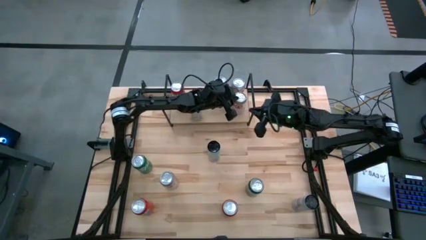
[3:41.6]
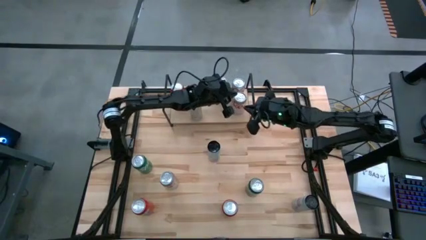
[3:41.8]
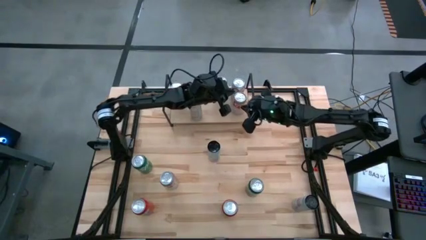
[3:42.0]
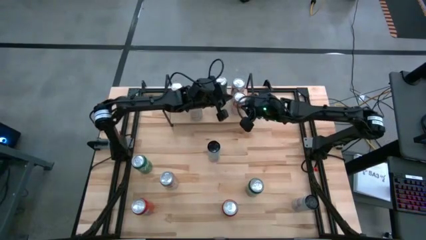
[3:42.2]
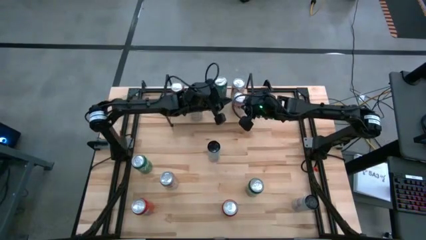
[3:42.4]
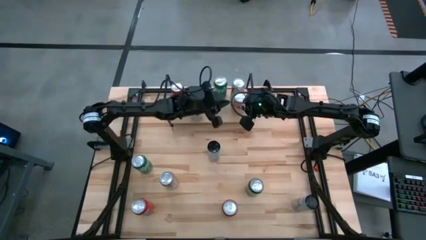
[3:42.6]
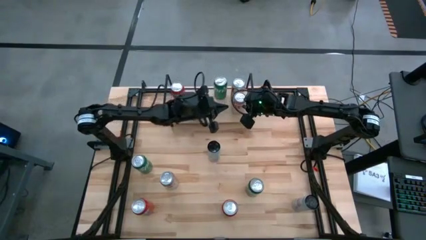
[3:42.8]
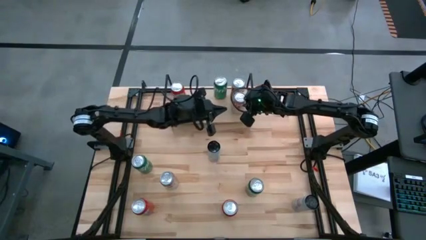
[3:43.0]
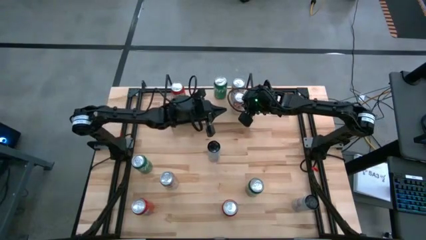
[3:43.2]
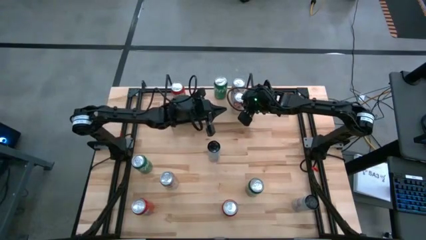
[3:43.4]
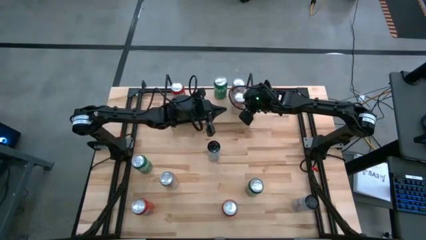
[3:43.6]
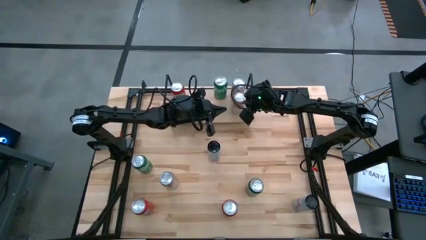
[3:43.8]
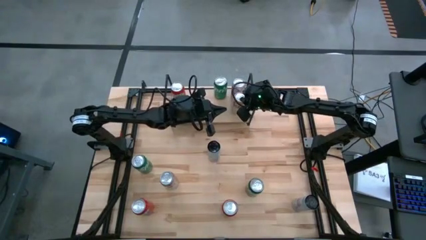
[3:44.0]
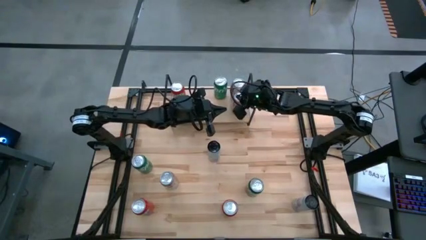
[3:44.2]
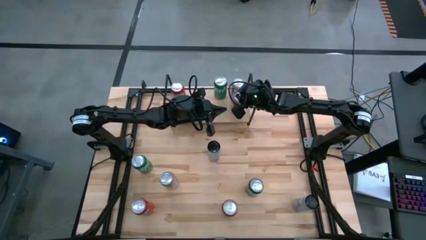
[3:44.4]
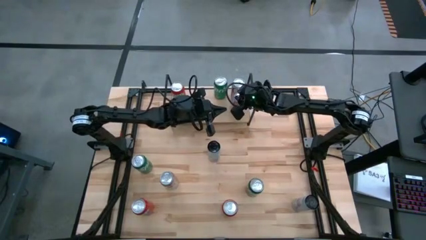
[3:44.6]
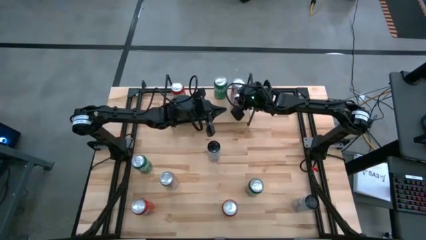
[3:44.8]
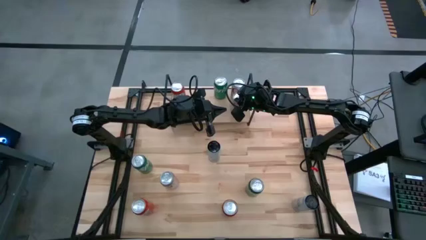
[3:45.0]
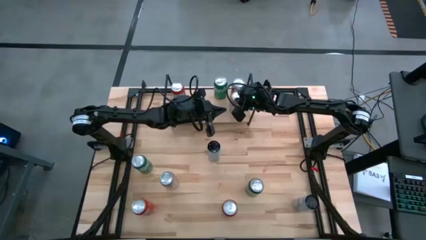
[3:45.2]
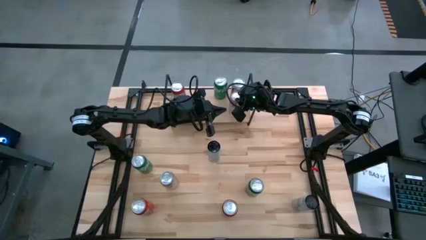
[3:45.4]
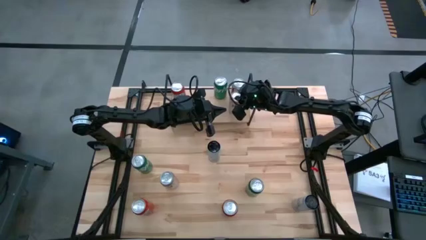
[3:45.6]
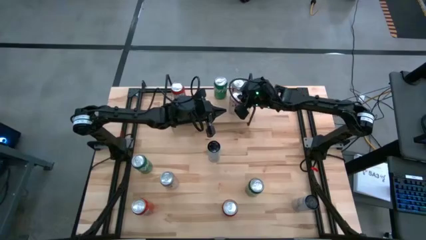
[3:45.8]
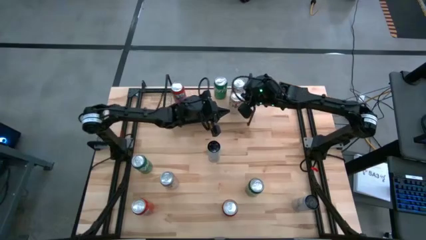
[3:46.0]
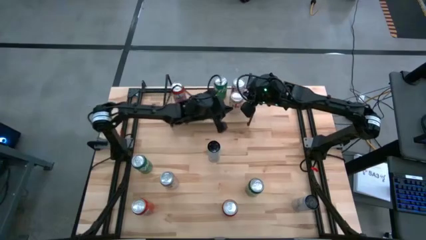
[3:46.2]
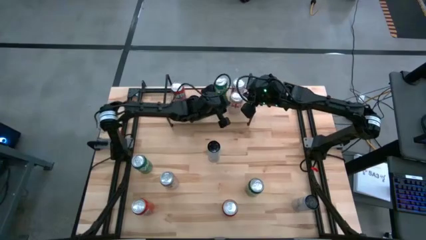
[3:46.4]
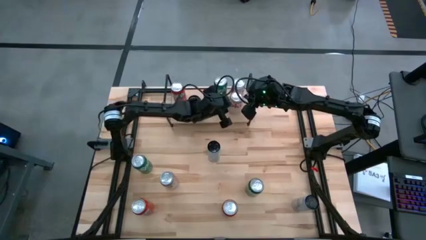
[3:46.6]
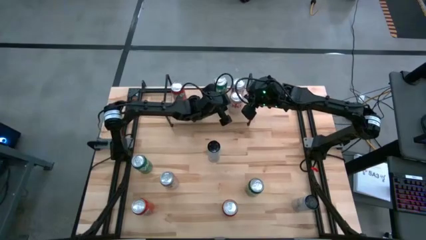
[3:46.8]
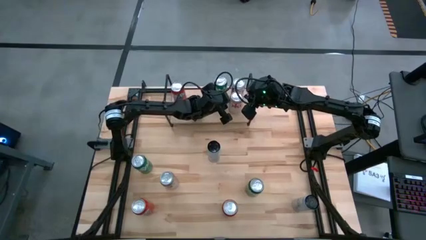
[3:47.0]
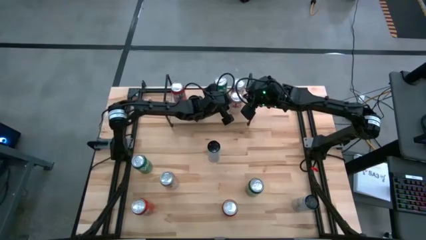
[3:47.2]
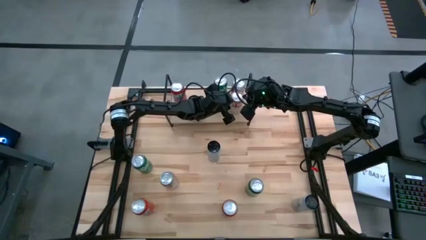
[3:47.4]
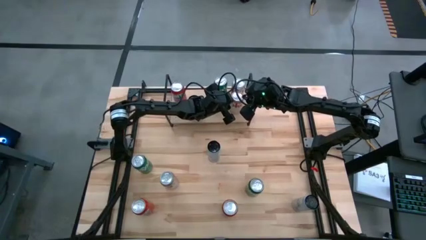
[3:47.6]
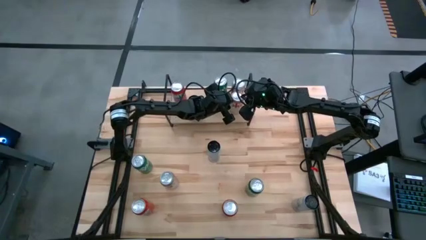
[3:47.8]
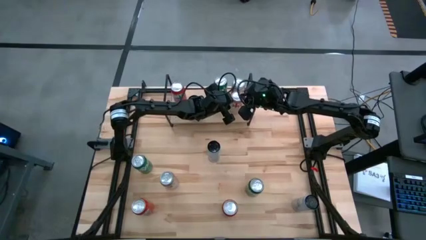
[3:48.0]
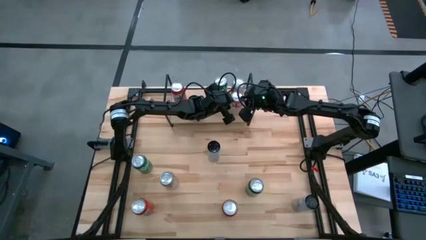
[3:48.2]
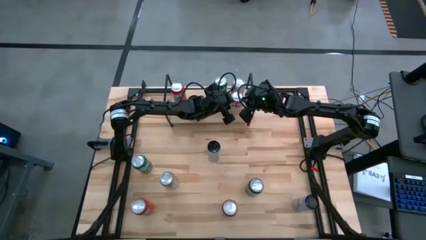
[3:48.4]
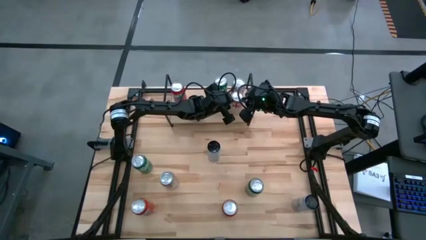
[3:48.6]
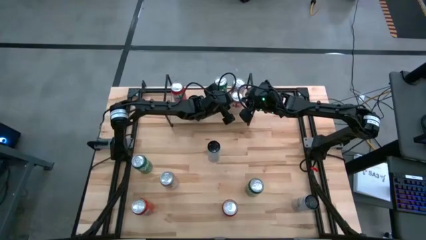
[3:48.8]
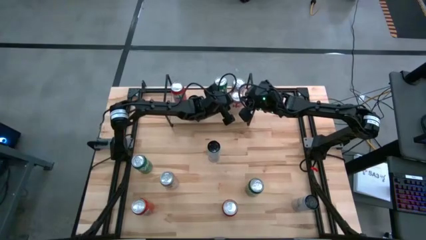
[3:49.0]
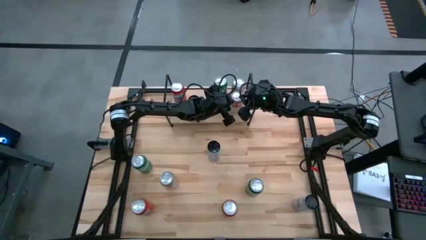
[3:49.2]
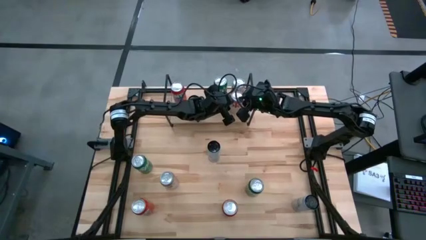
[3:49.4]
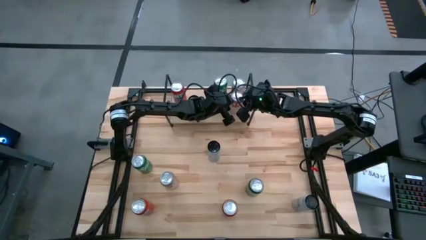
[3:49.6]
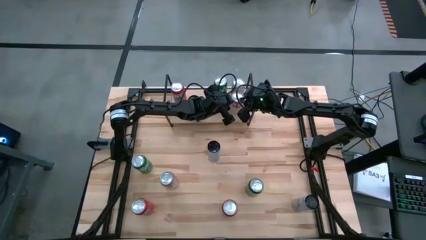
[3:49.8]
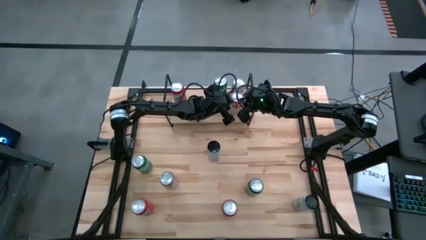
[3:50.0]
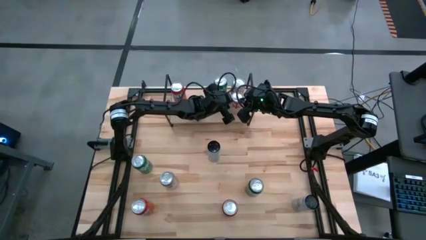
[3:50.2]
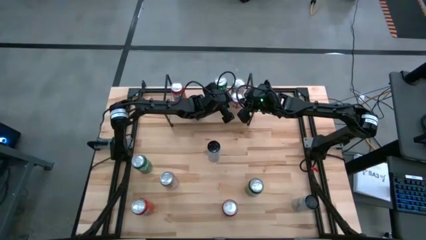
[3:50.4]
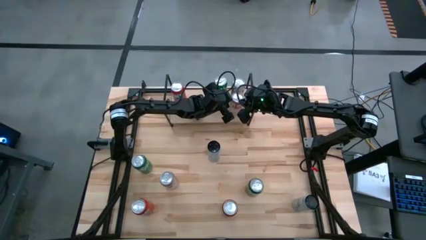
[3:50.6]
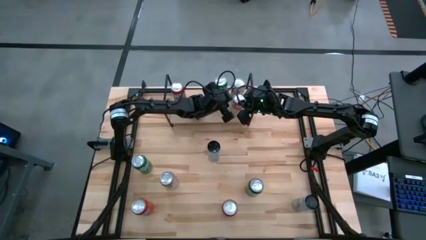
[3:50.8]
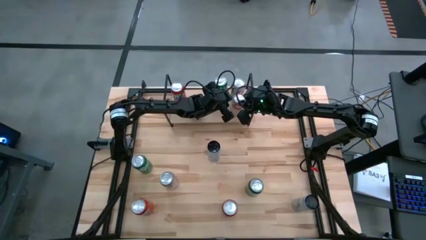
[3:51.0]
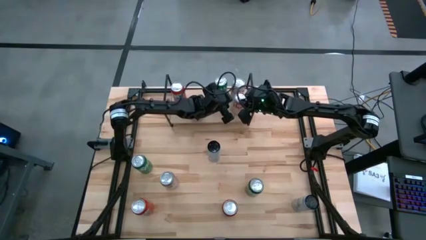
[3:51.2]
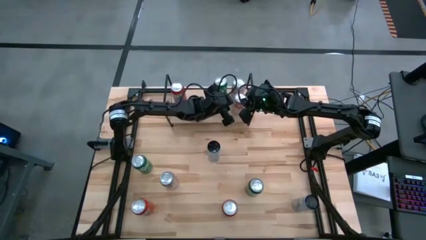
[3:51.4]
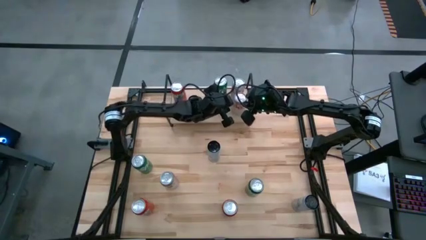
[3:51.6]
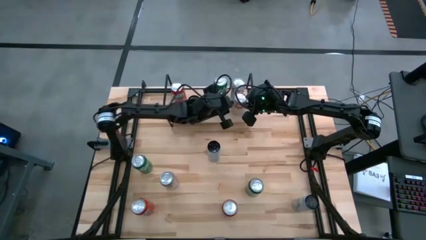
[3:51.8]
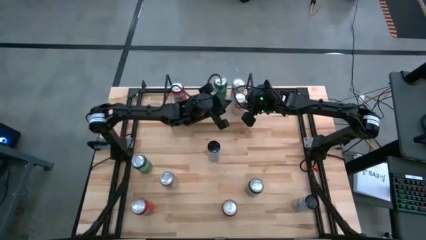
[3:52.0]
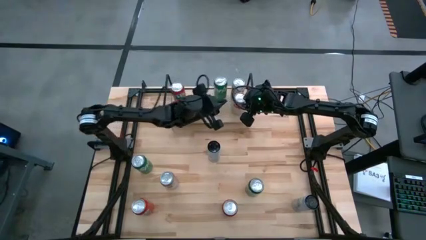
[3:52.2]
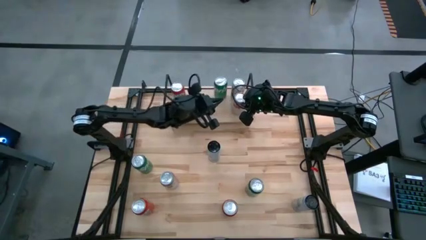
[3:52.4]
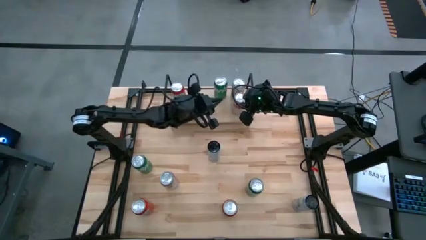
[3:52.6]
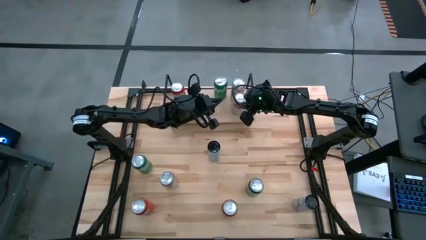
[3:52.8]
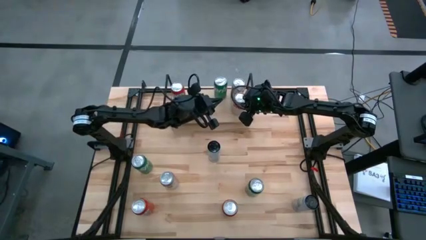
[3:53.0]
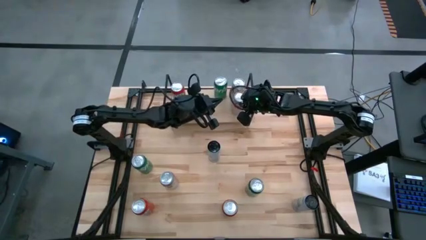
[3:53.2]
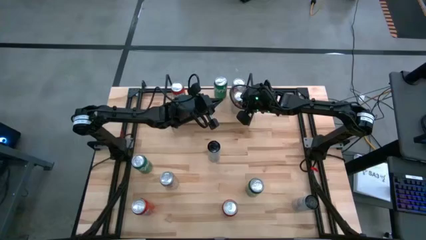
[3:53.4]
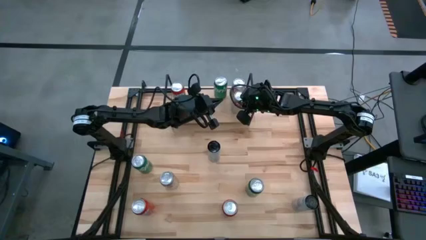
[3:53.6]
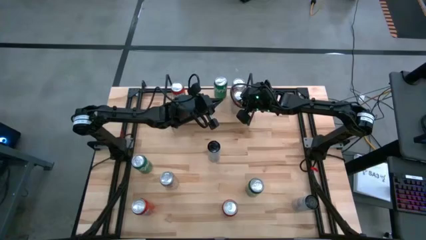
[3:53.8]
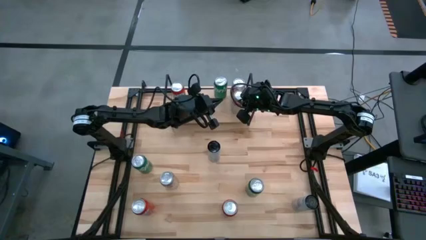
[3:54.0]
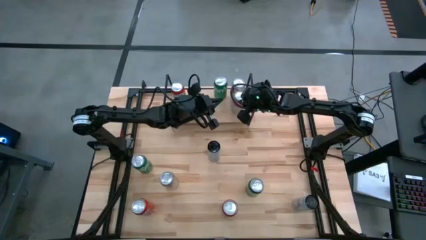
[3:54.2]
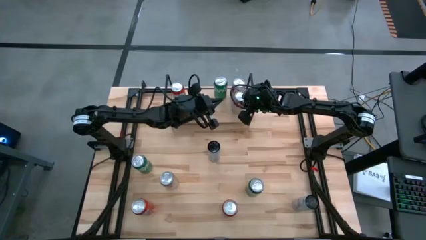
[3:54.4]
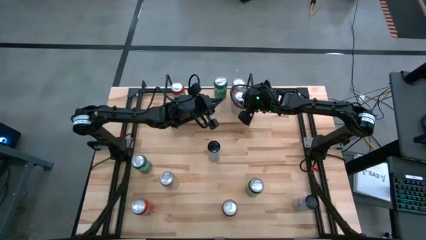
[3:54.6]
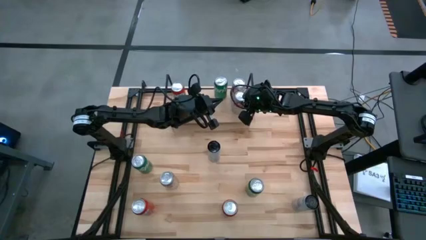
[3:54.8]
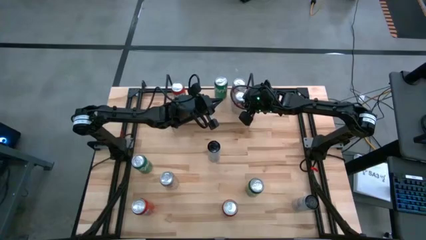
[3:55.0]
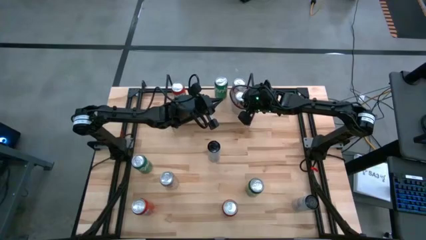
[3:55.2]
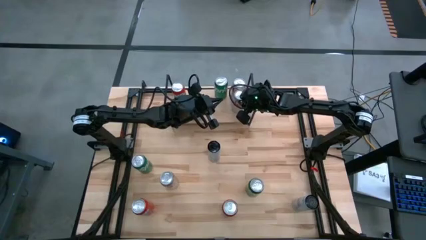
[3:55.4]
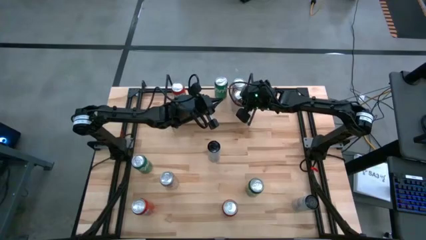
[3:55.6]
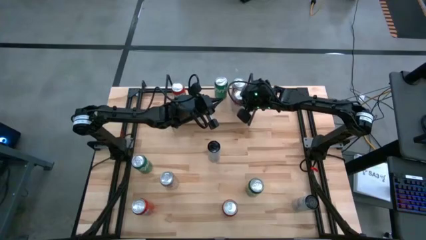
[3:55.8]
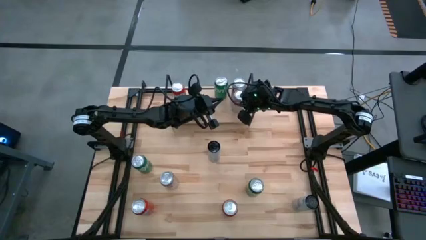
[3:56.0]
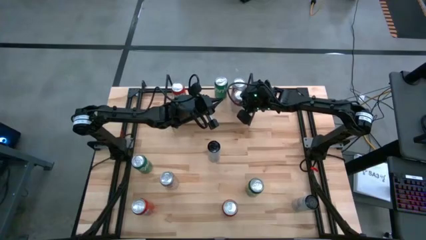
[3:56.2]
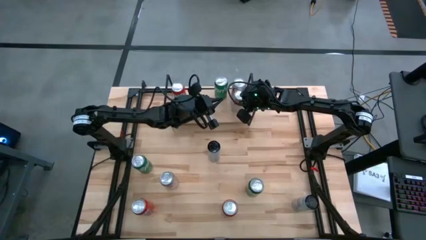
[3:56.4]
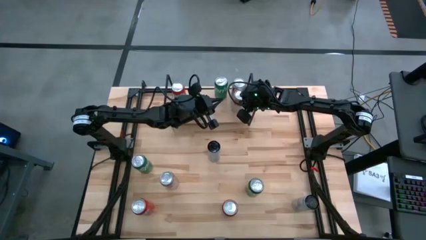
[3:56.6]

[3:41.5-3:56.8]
Task: Sort soda cans
Put the top red silver soda can on the shelf and align it with the other red silver soda can
